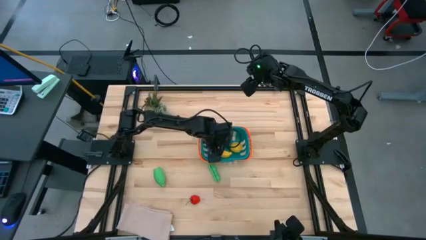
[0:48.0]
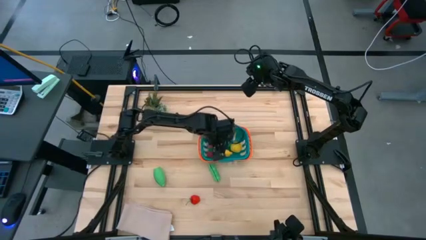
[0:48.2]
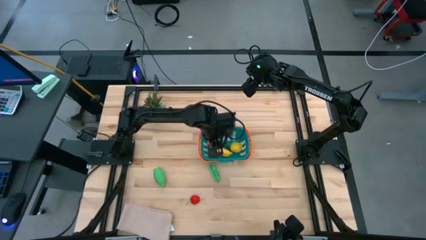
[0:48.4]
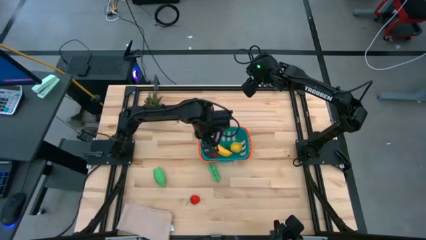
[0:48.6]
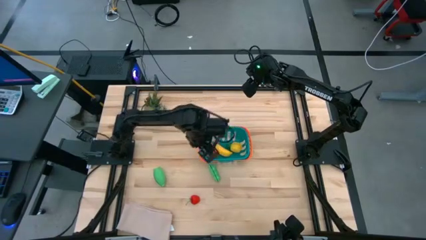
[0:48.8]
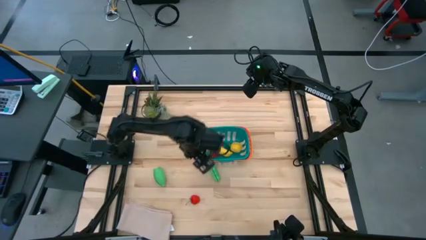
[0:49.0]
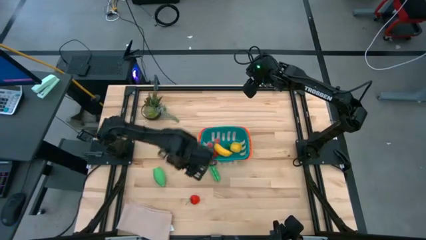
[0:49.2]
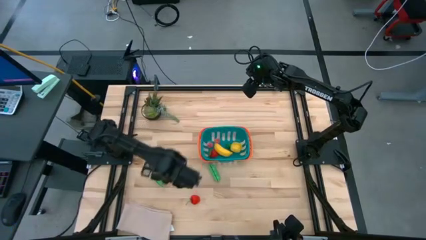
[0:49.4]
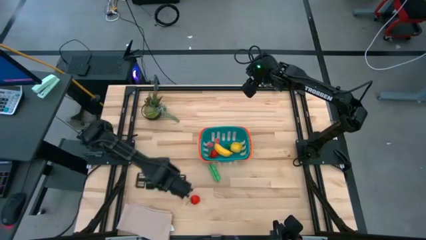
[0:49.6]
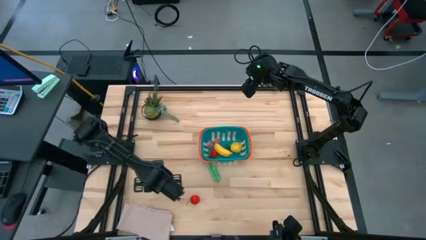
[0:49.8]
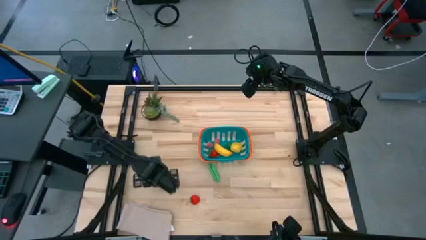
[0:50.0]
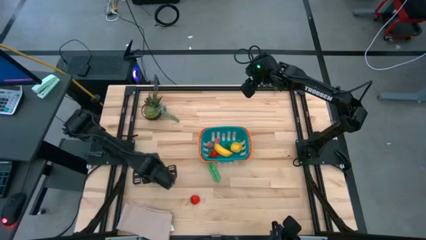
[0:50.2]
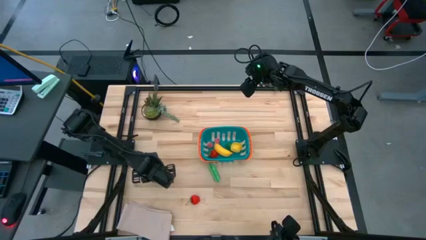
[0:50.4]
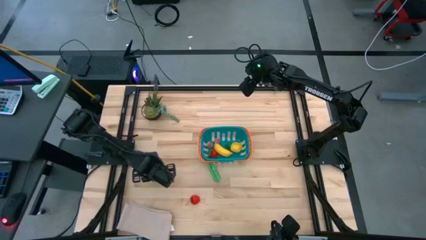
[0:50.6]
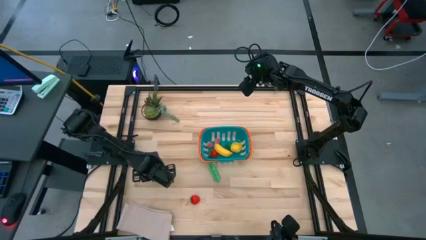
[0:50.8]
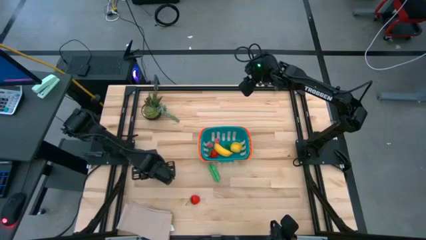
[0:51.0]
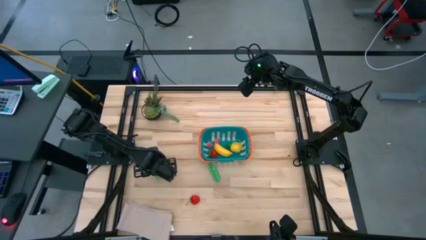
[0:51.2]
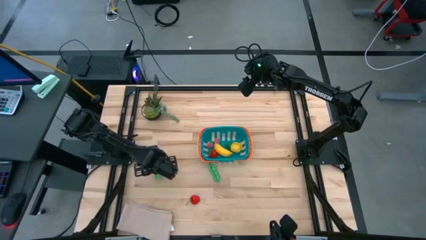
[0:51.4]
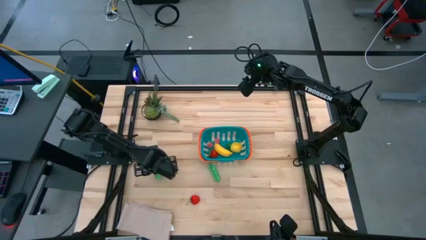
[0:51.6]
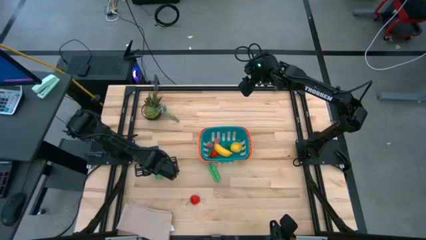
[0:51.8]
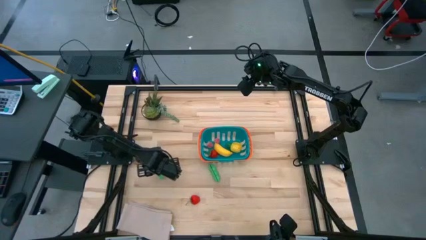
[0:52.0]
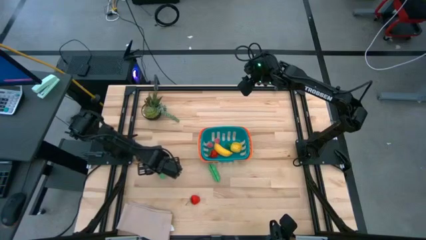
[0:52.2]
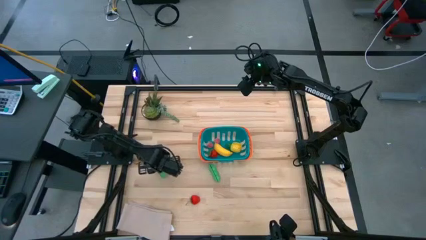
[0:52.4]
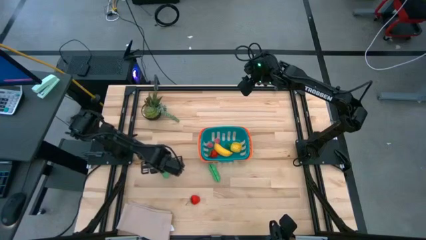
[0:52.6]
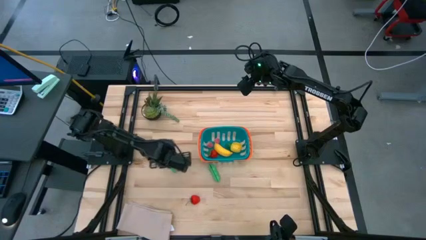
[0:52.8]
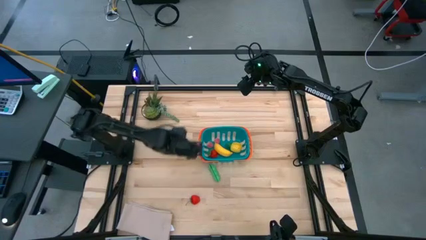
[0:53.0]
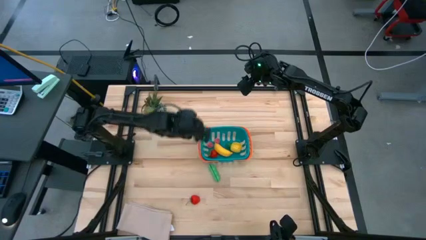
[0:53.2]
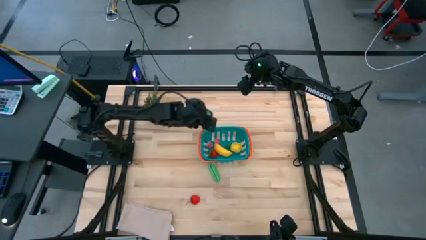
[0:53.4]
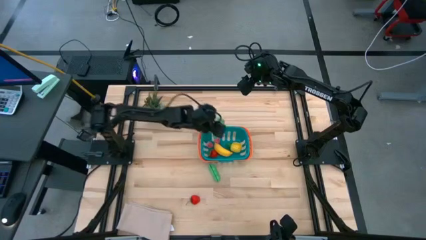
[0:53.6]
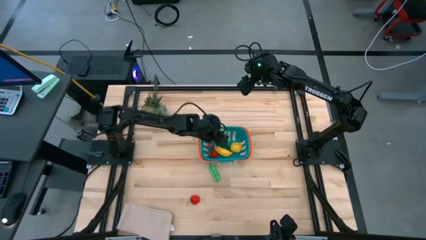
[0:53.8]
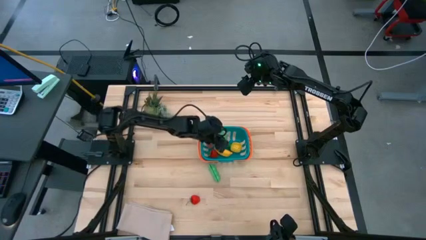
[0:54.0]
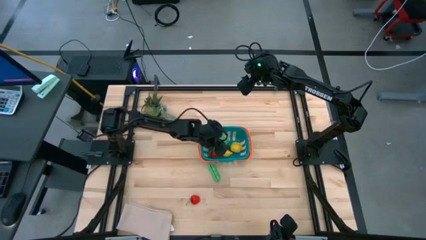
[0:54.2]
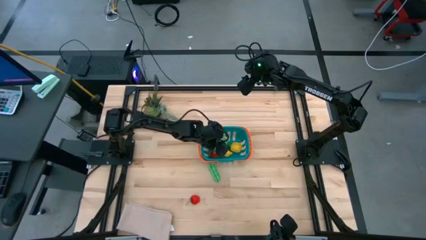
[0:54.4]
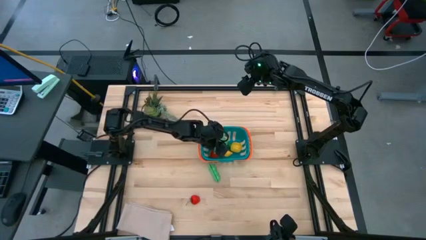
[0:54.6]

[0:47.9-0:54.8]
Task: Pick and placing Produce into tupperware
Put the green corn into the blue bin

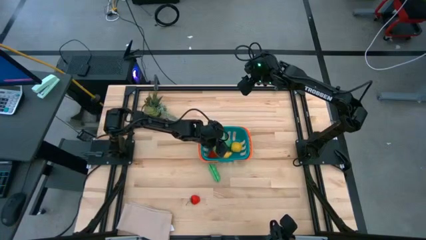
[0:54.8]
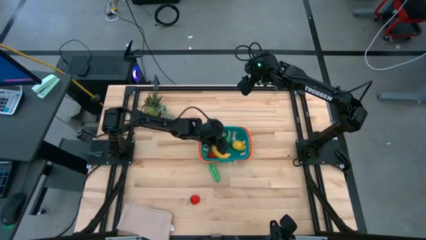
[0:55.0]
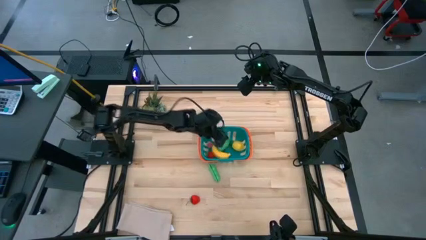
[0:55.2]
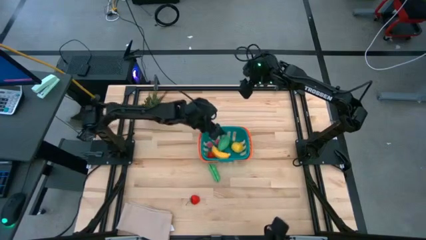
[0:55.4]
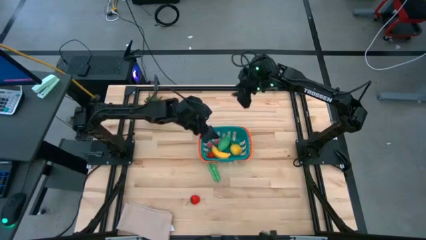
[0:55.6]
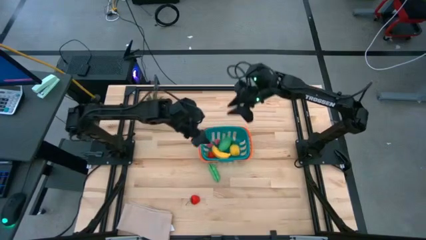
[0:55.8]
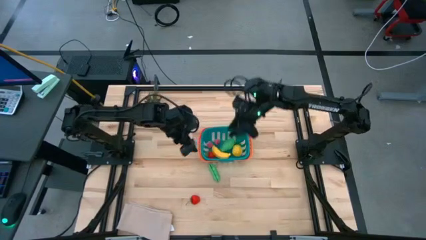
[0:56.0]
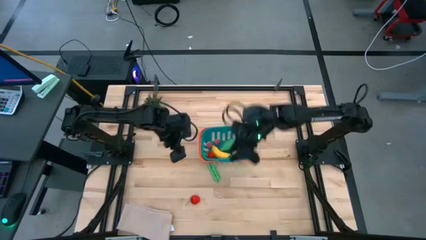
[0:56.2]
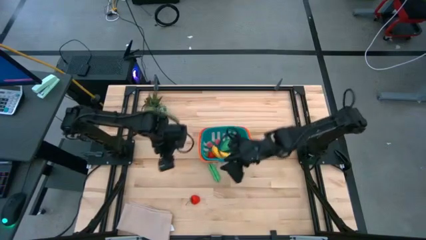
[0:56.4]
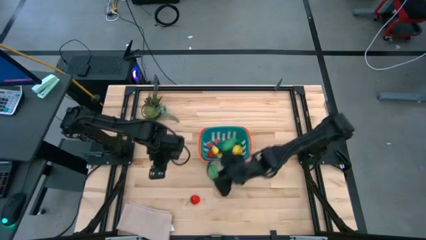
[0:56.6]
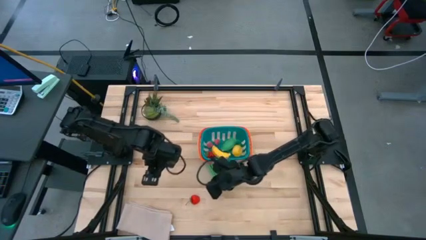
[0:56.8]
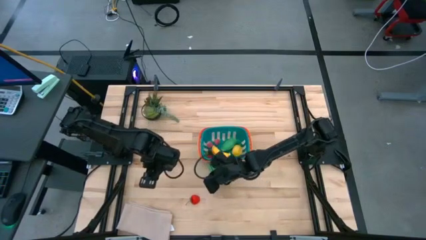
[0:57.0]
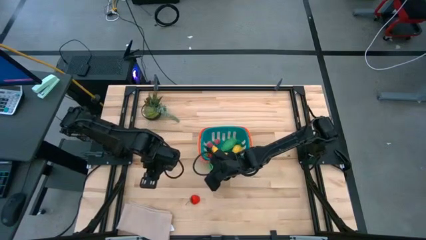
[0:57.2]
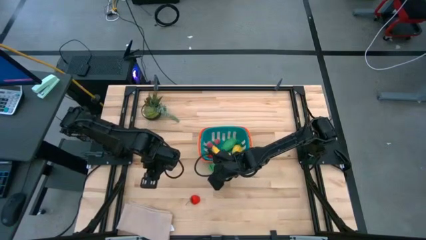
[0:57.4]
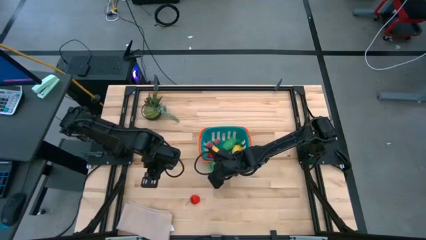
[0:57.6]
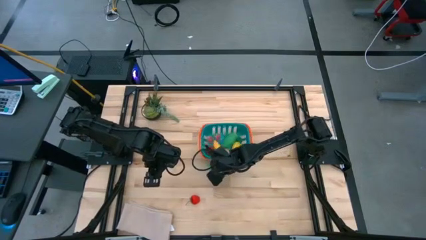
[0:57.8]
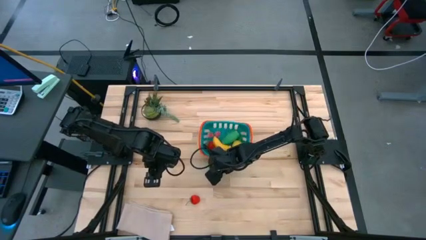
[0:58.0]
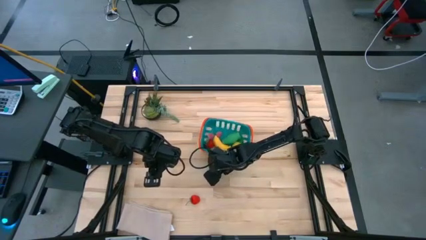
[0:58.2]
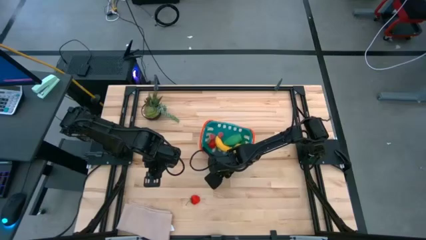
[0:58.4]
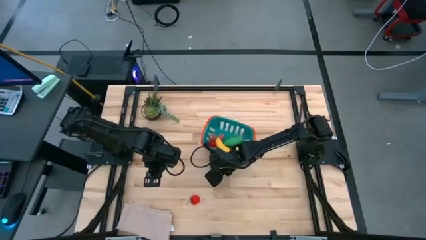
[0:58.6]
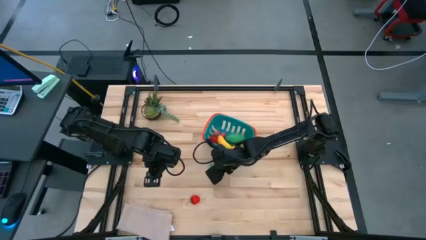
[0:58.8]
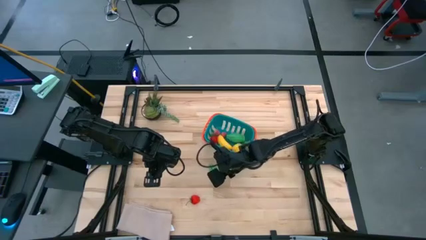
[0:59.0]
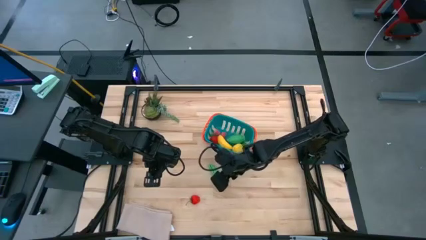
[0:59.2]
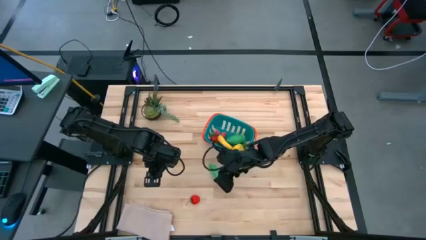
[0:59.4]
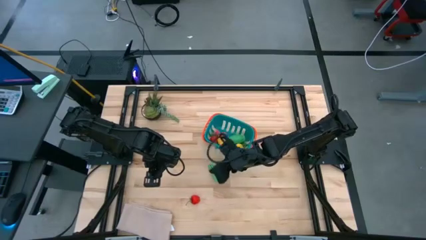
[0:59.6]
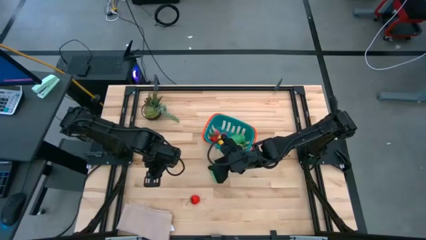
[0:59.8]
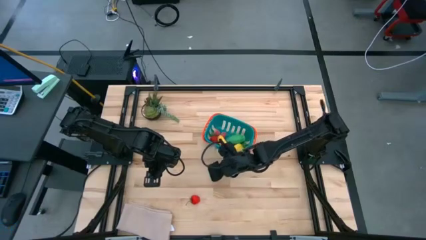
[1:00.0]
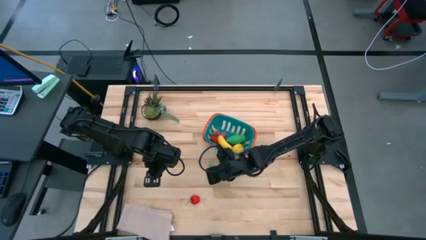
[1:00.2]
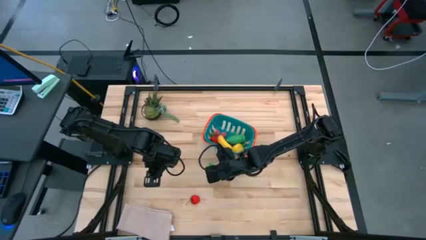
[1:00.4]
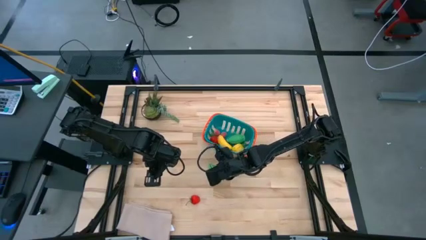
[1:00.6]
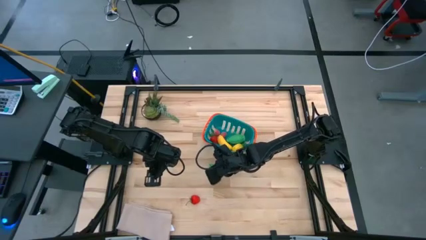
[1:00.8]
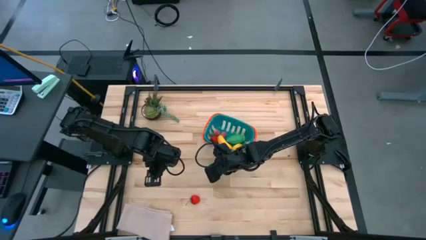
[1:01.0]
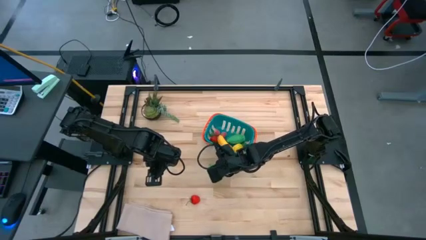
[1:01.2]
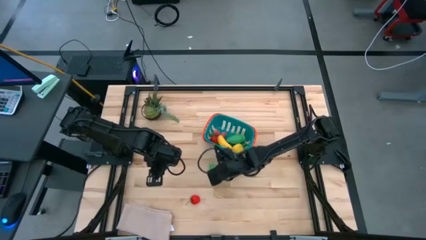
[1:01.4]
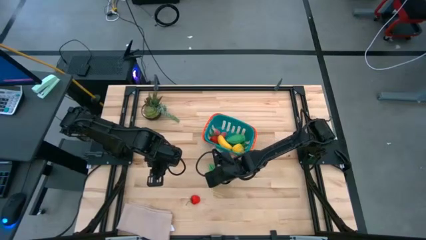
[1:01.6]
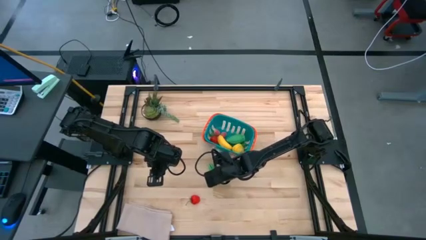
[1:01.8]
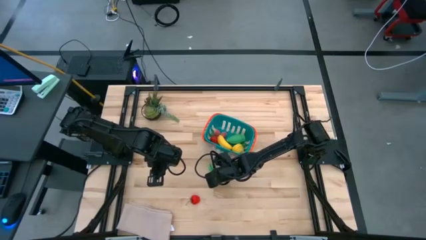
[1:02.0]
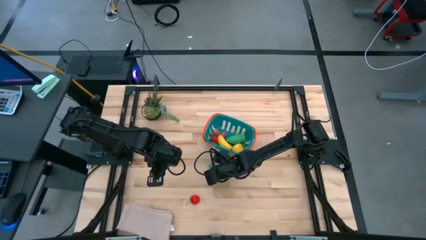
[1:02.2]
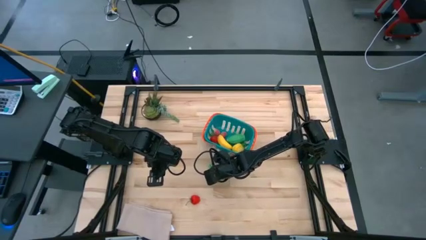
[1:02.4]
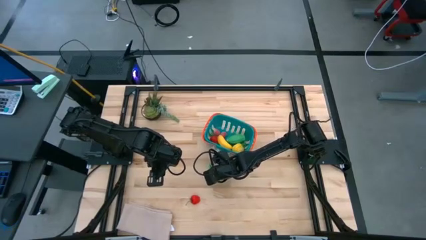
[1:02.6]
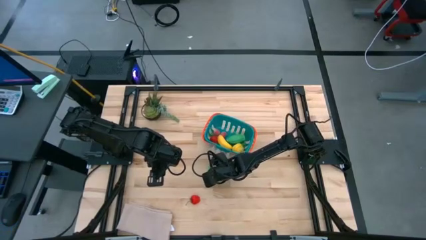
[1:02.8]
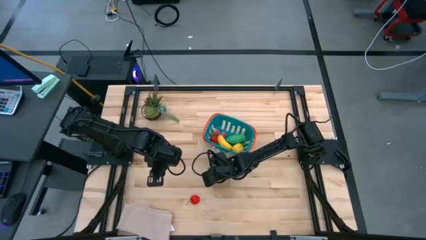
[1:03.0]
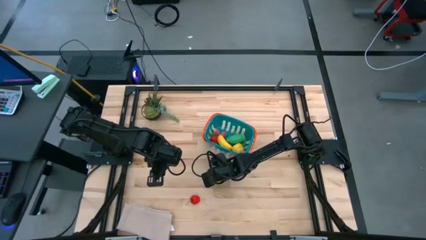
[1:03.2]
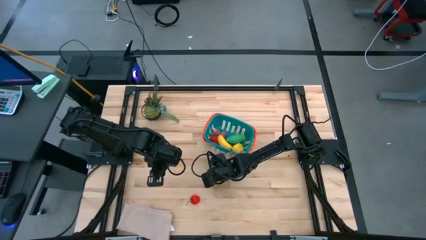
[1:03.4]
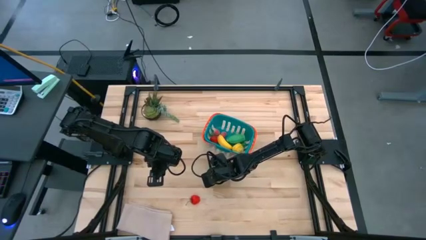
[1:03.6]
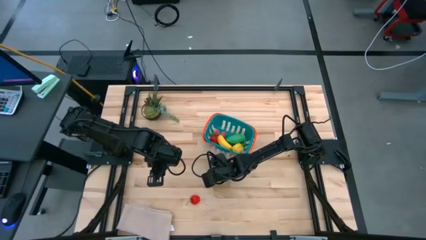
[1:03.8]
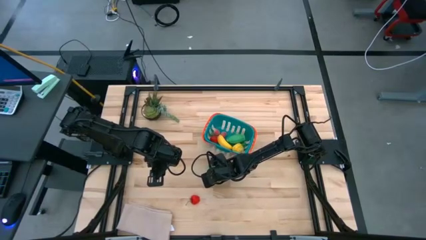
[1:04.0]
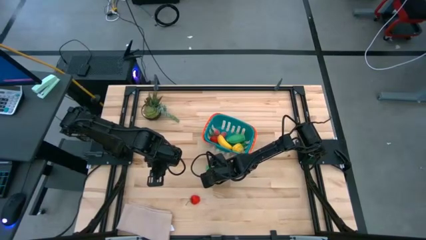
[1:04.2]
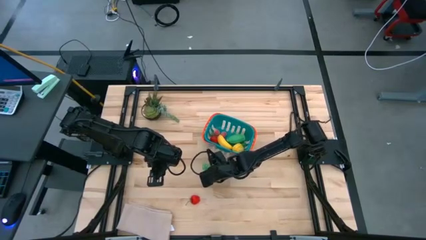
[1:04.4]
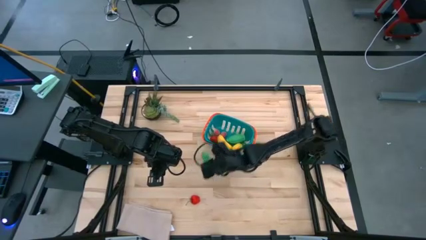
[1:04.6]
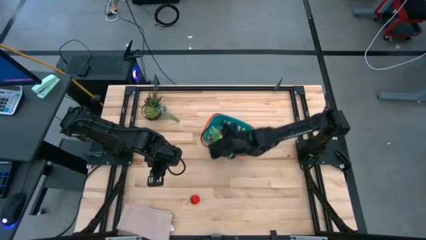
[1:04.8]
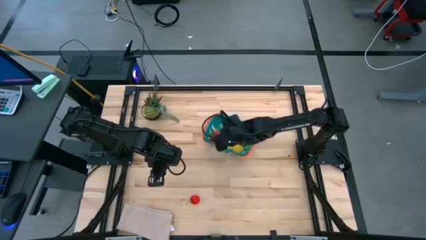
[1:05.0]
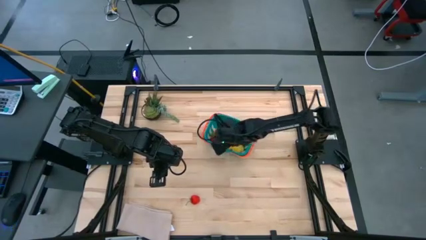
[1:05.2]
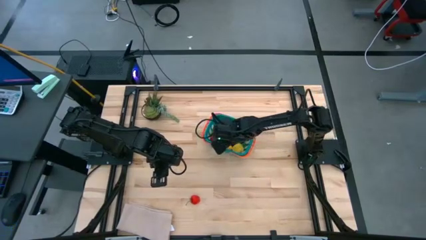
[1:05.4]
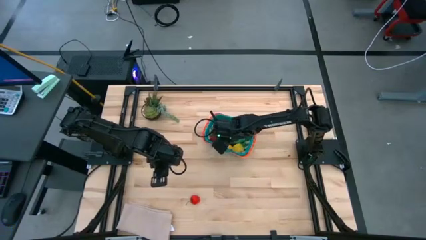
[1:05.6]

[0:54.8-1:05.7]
Put the green pea into the blue bin
